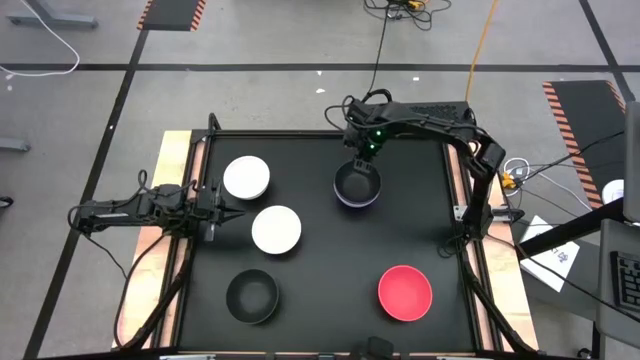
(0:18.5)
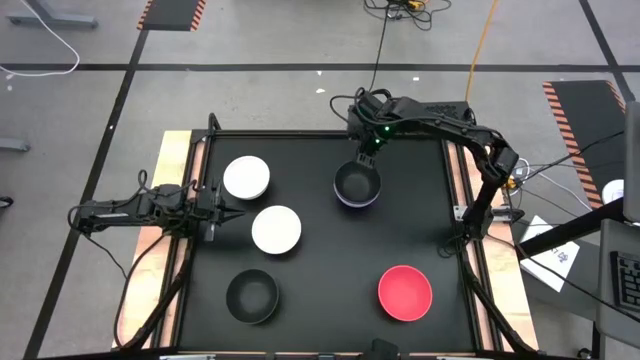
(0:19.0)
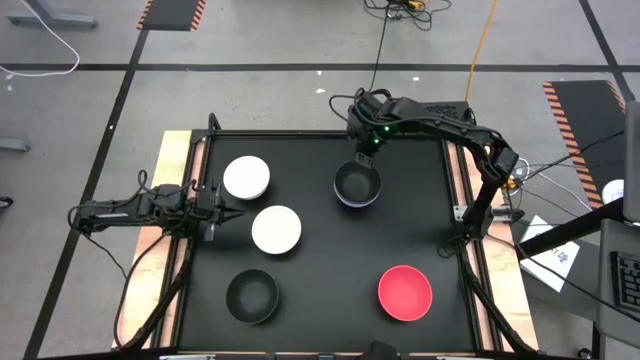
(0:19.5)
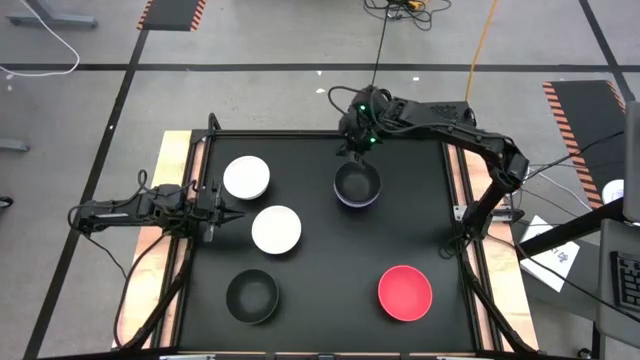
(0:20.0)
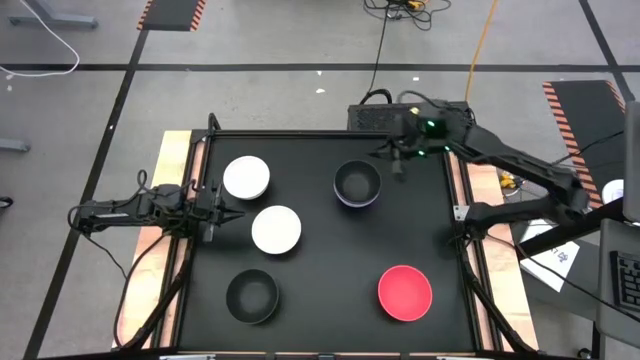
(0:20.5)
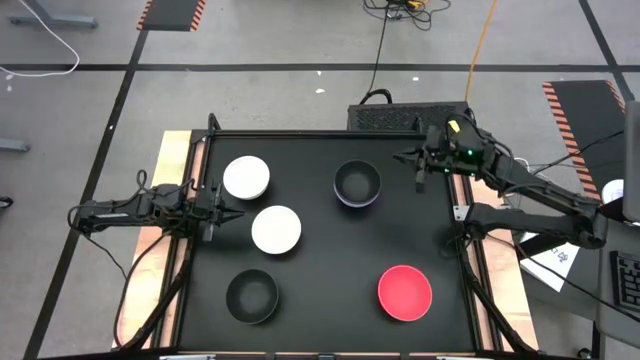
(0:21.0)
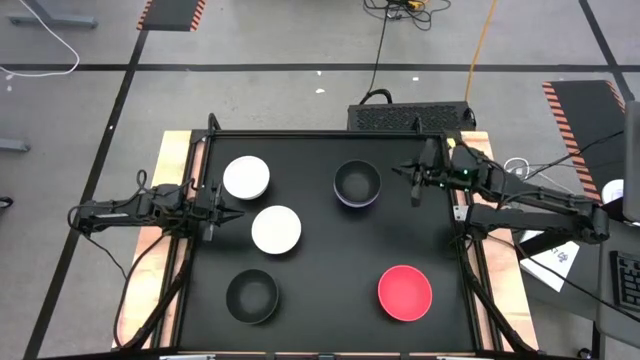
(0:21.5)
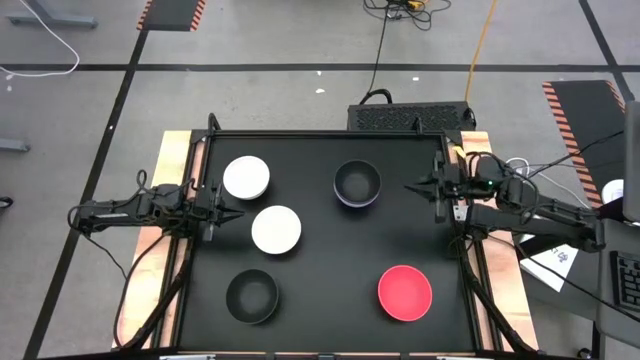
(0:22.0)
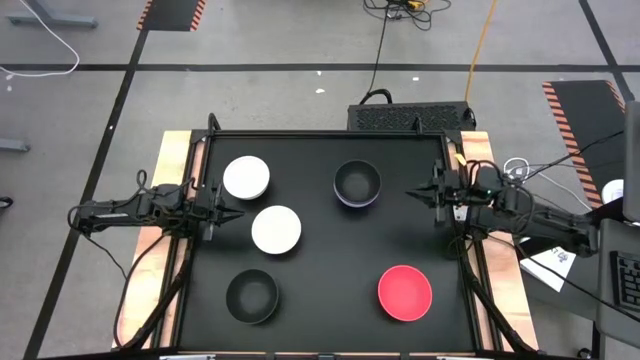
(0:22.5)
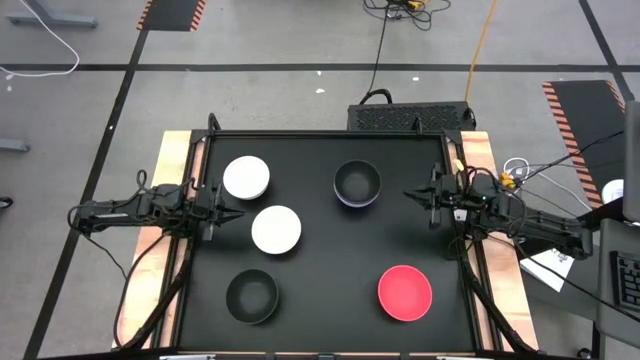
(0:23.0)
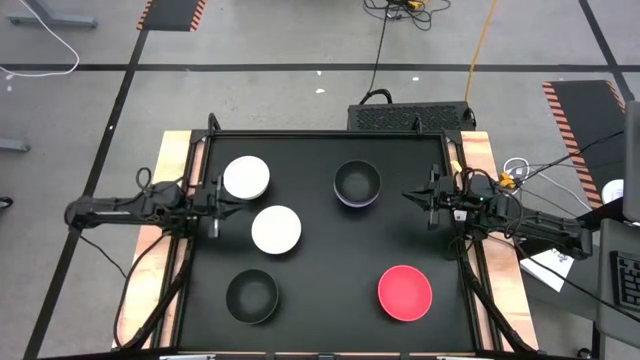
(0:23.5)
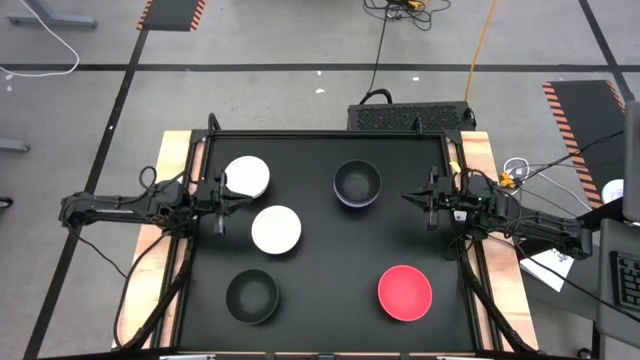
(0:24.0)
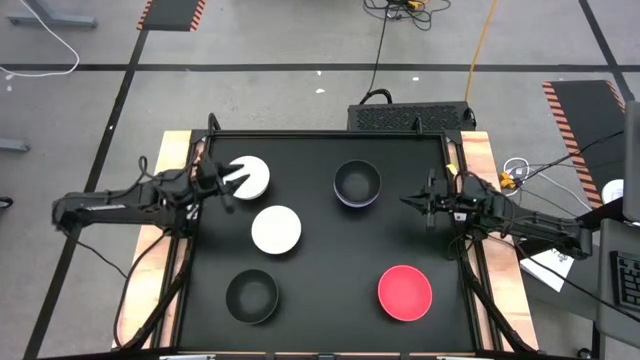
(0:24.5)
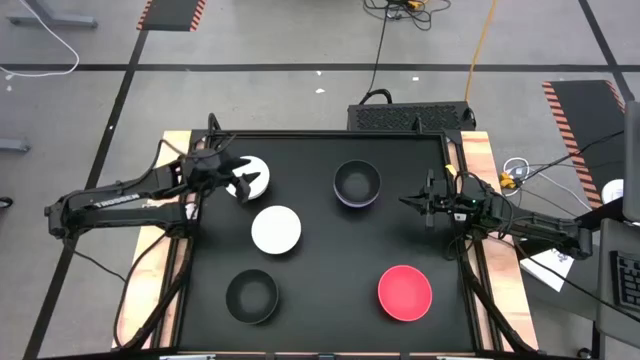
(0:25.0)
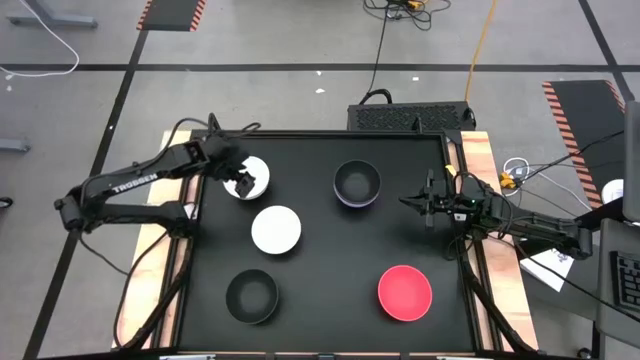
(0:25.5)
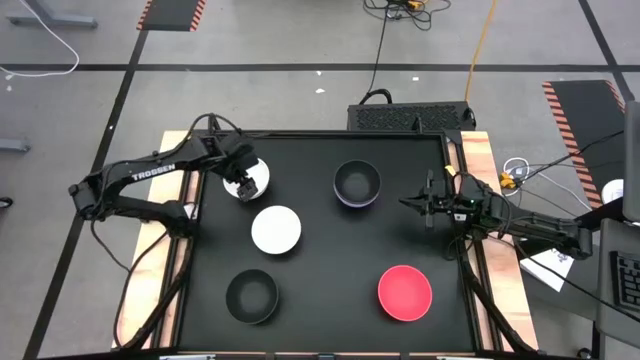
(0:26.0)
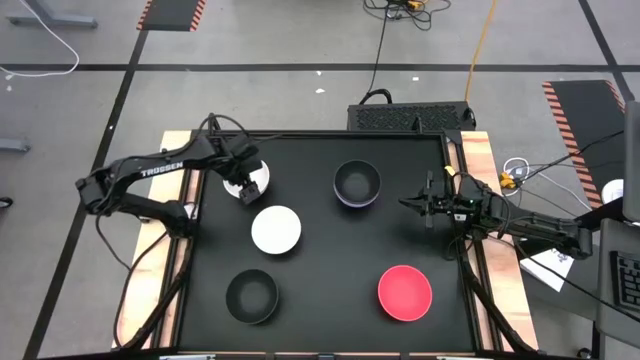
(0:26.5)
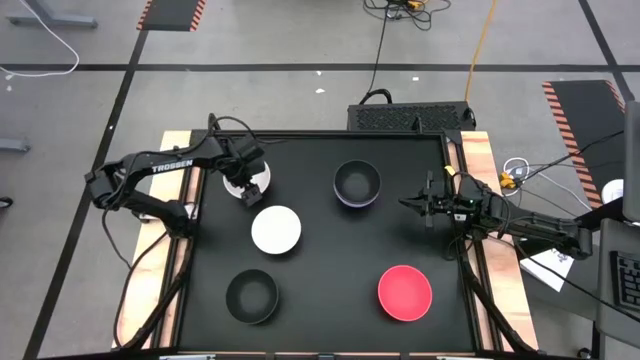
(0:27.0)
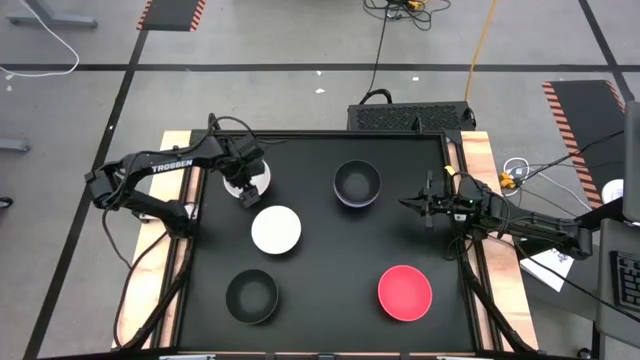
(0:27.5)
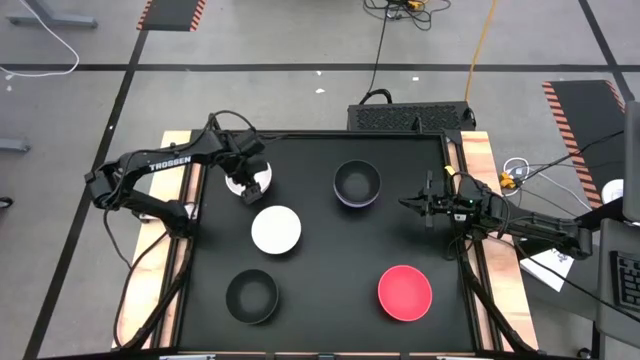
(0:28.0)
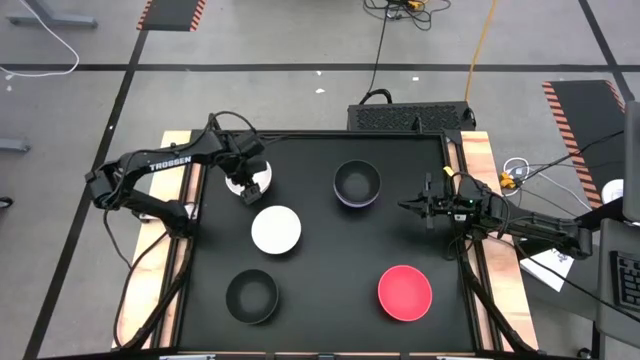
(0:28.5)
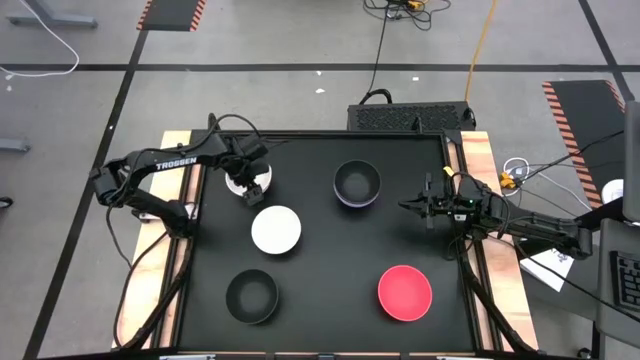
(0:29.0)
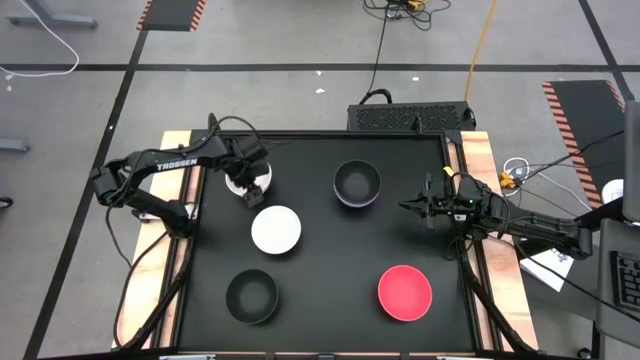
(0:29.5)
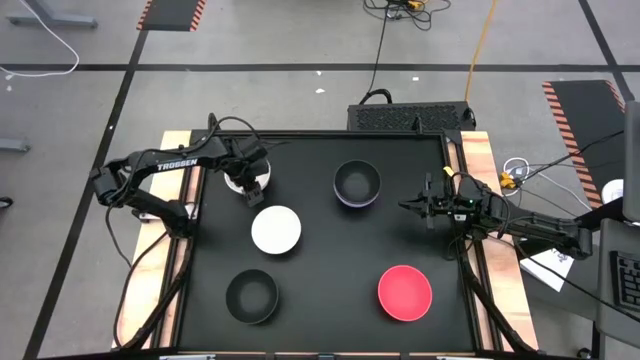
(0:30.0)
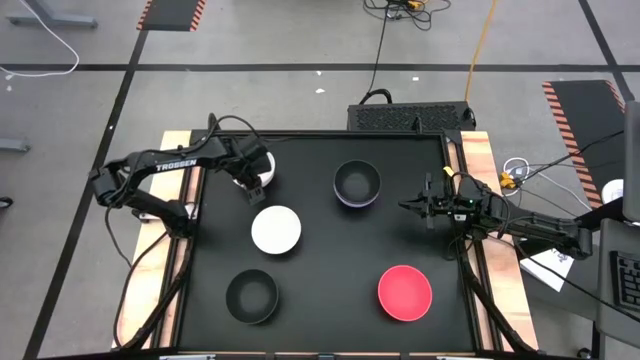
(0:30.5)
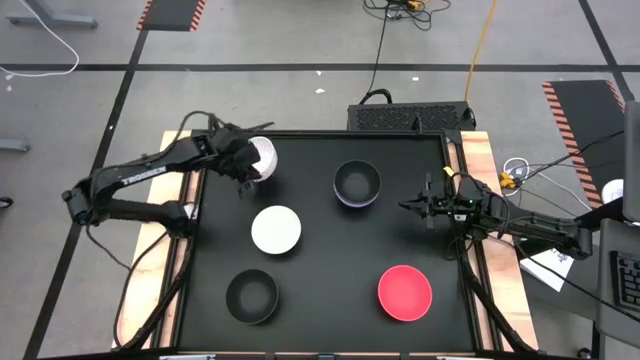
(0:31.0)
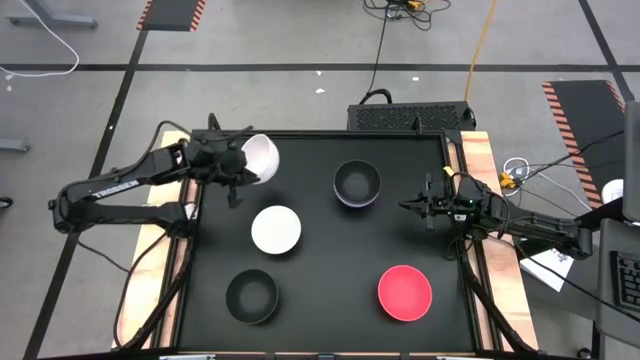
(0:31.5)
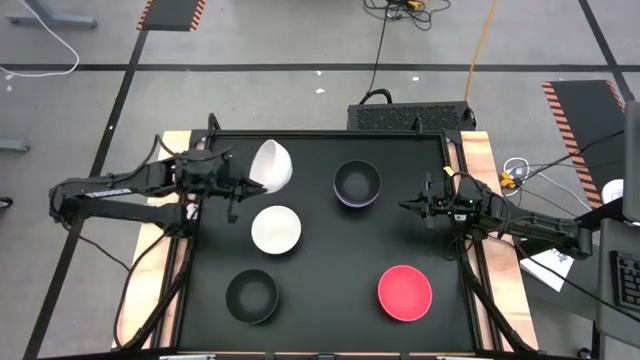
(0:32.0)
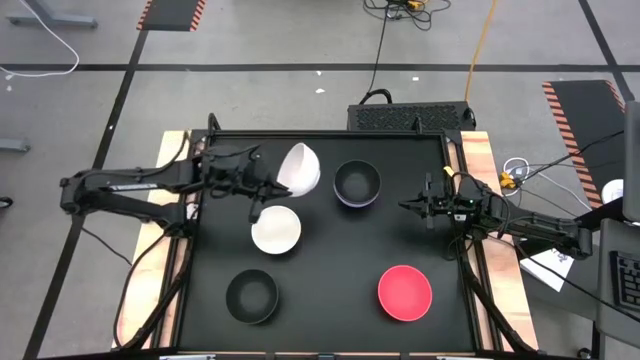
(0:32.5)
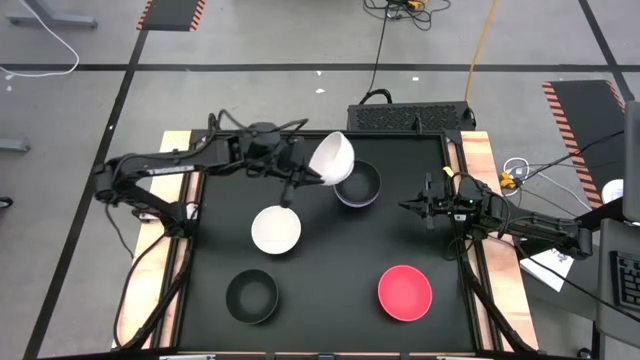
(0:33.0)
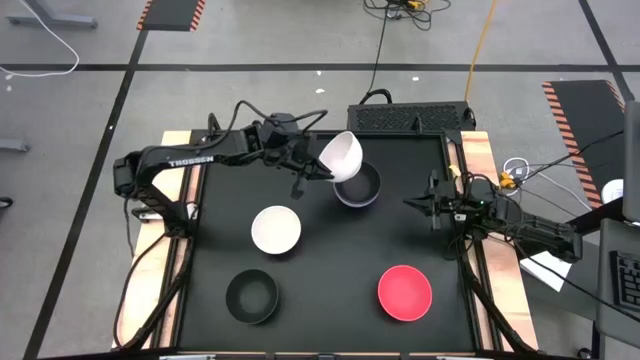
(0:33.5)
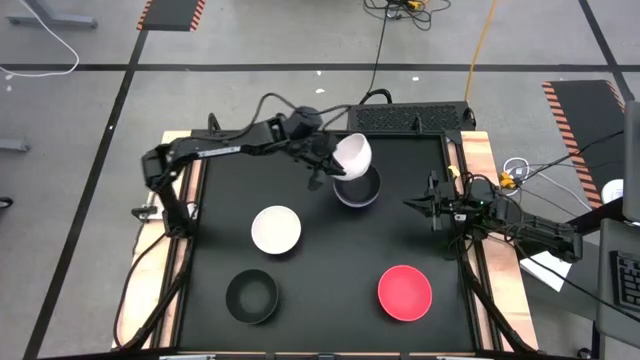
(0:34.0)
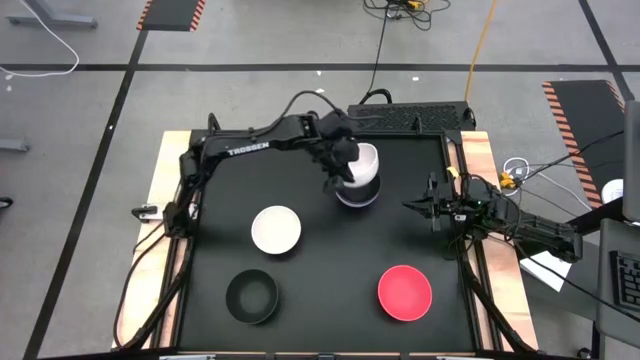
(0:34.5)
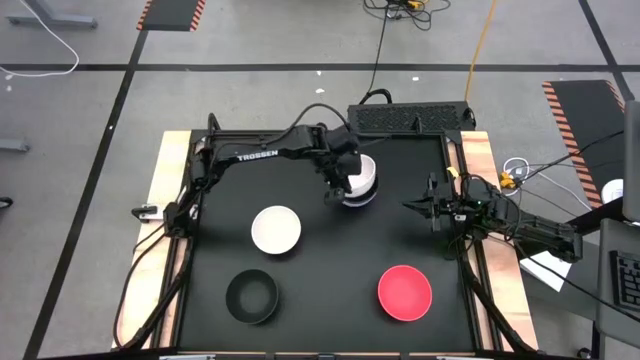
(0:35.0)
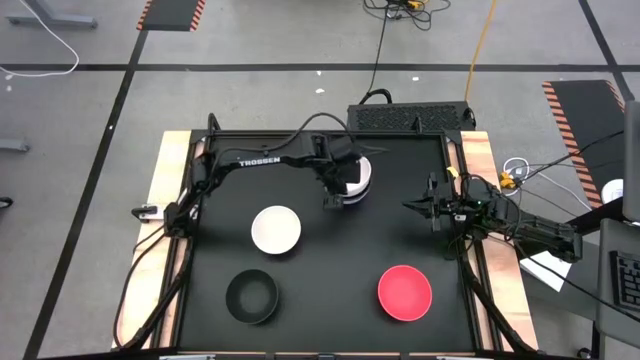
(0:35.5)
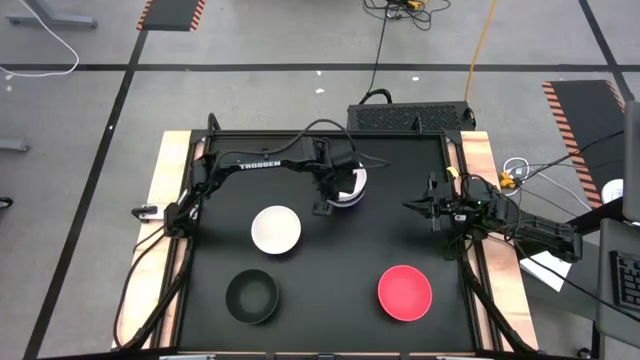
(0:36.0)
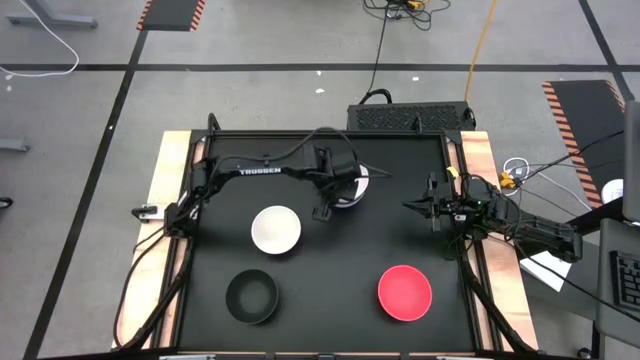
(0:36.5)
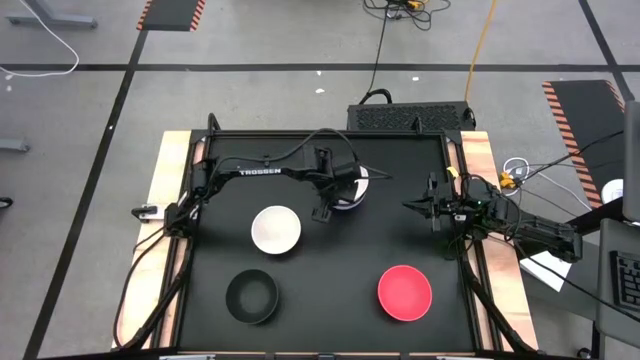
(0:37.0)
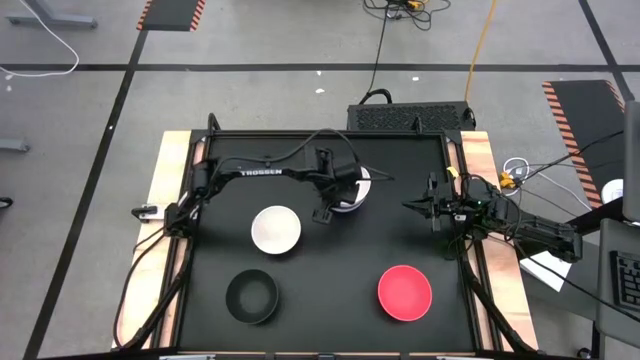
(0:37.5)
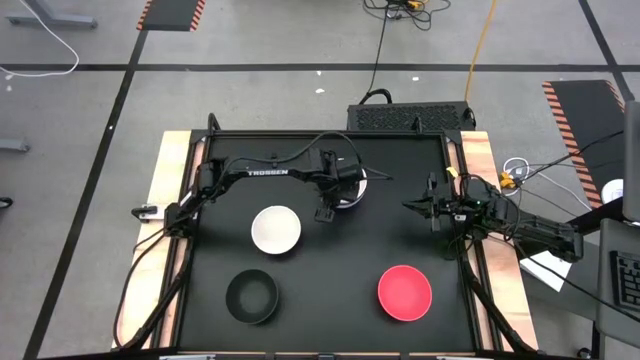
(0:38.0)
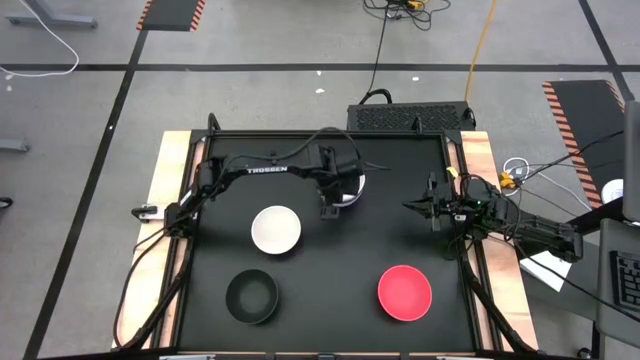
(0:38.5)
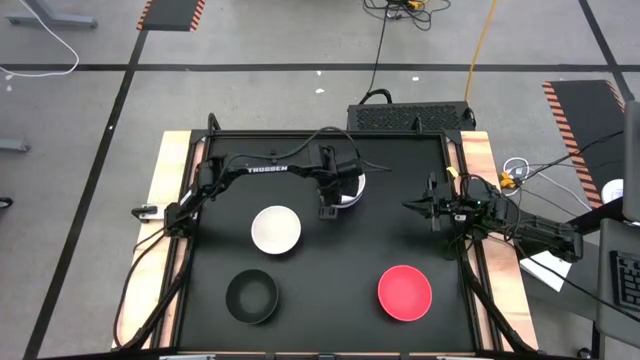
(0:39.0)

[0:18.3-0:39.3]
Task: Nest bowls inside each other
Stack the top white bowl on top of the black bowl
